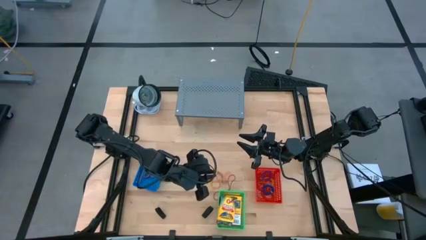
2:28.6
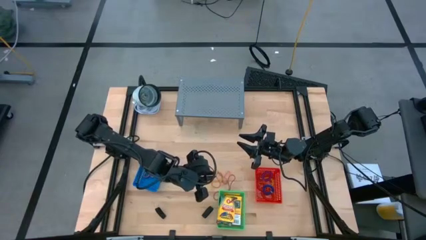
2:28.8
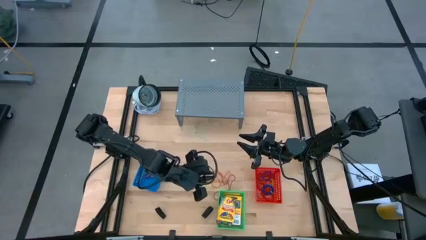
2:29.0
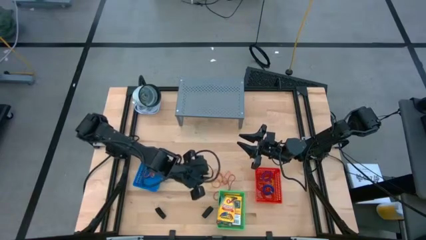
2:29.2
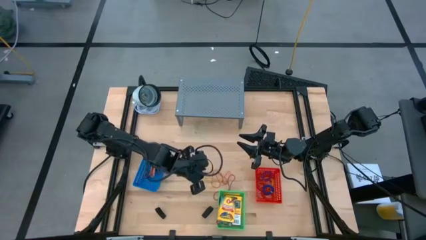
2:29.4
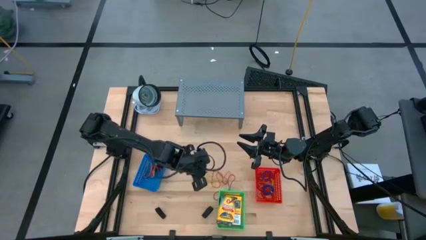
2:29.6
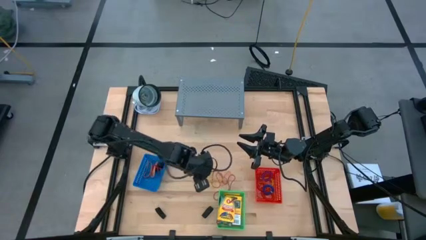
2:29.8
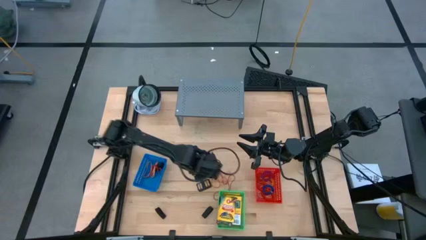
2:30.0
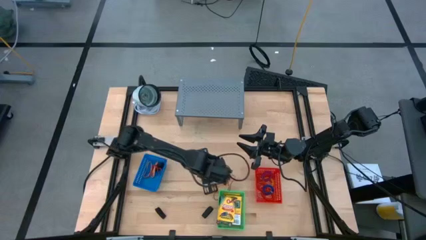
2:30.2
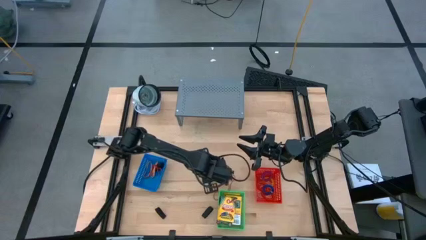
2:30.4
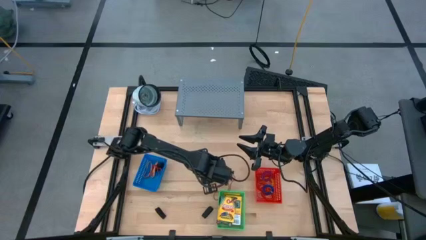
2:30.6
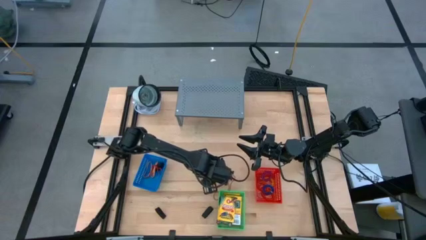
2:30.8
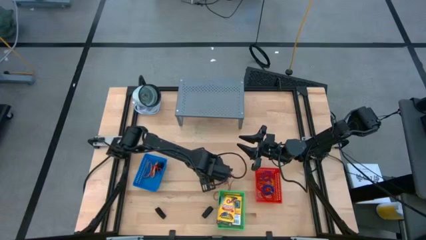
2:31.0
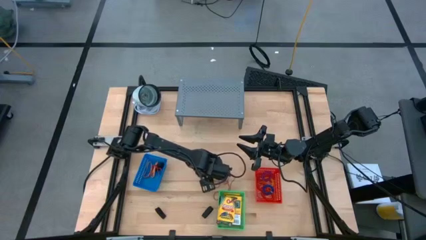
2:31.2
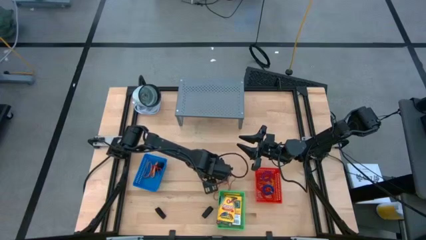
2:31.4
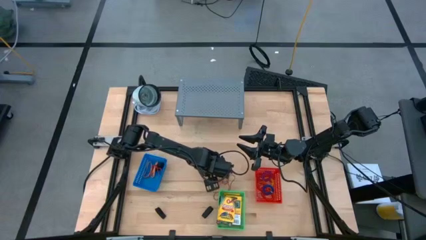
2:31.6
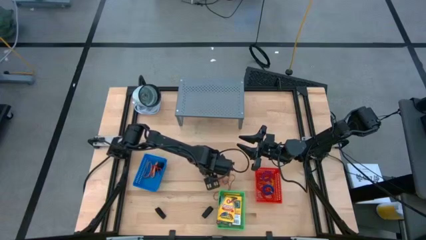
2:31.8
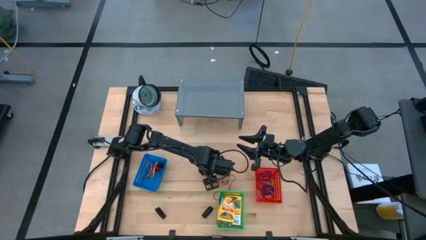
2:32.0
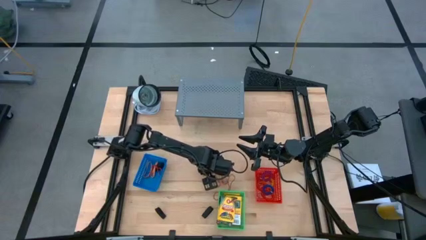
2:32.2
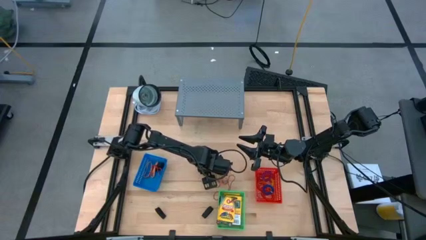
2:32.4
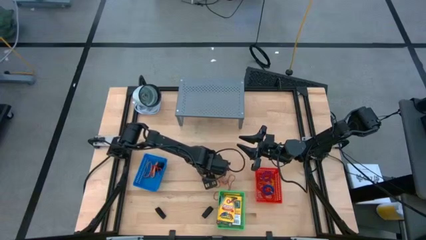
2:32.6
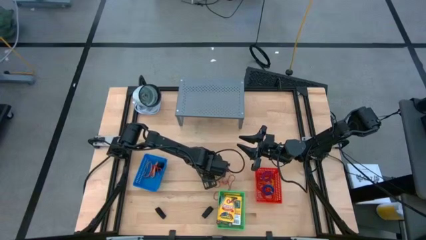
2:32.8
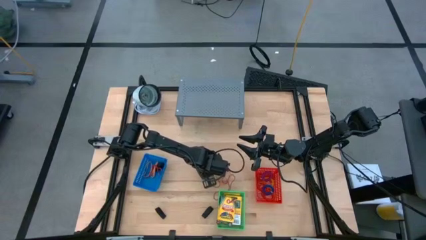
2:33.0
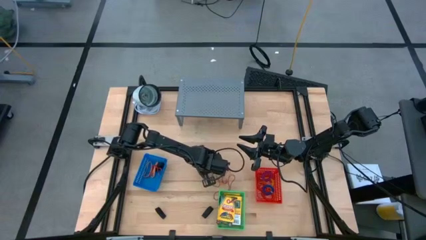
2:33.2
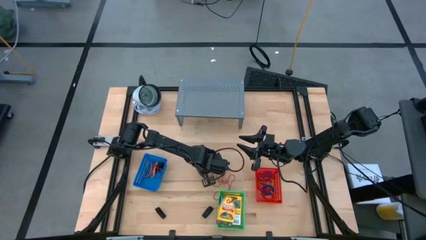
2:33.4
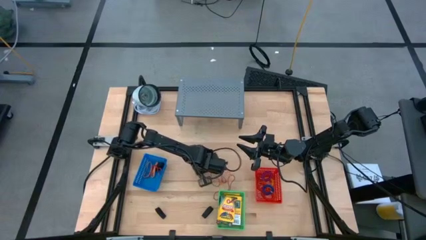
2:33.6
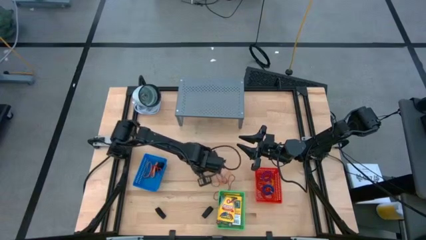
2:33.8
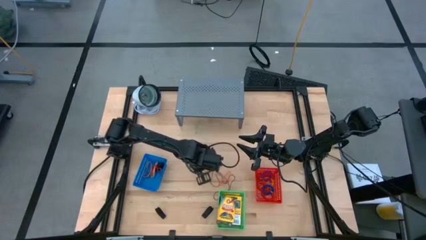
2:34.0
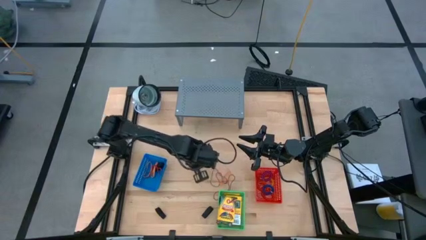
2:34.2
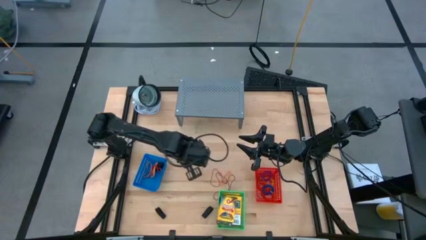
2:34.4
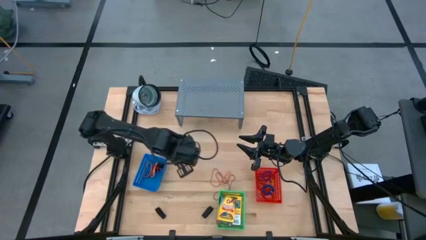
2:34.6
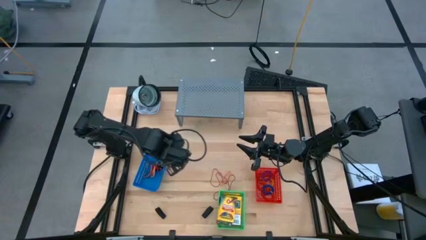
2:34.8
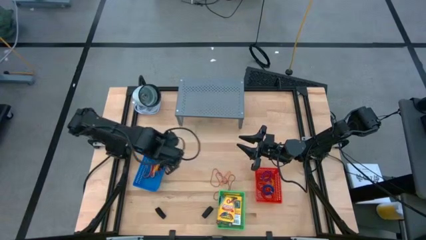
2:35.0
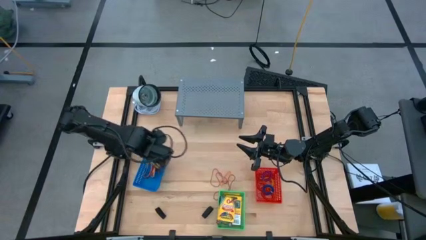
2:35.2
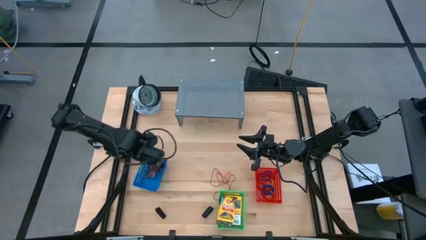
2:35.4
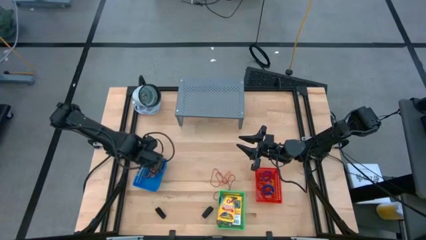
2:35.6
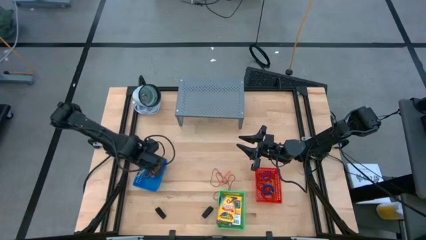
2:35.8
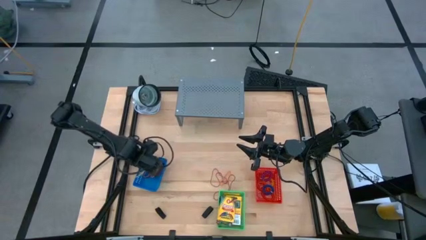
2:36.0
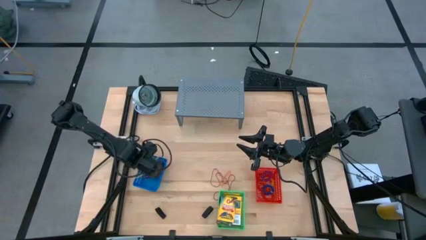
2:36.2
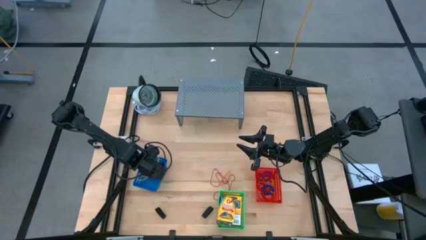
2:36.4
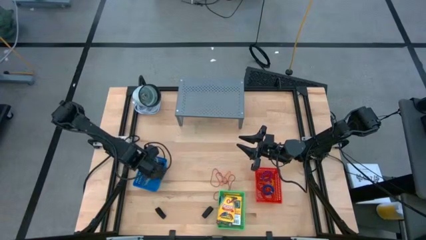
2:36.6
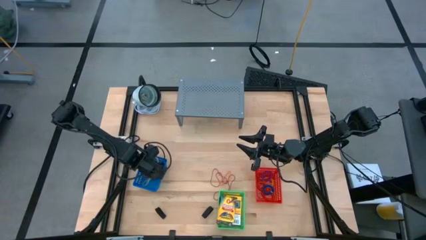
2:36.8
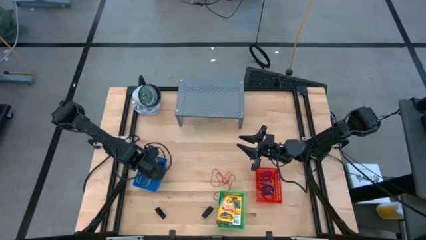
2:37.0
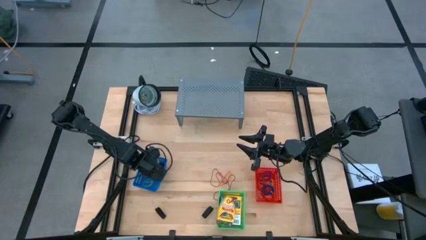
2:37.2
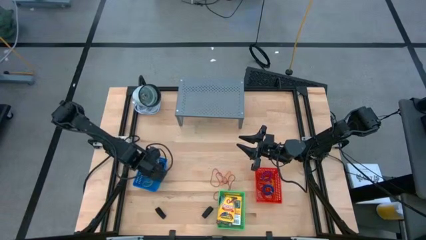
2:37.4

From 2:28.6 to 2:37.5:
Task: Pick & Place Office Desk Supplies
Put the yellow rubber band into the blue bin
